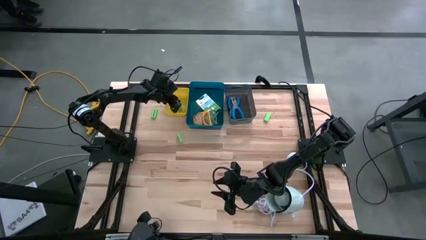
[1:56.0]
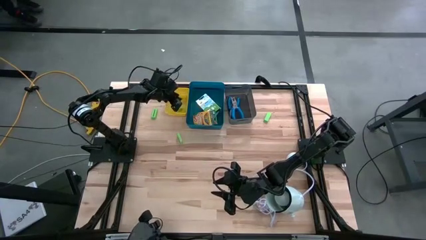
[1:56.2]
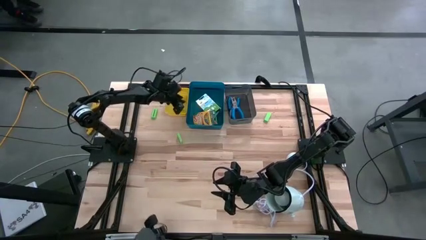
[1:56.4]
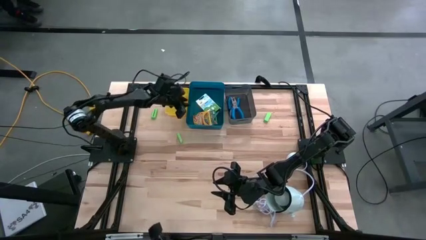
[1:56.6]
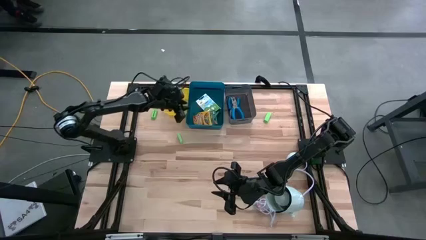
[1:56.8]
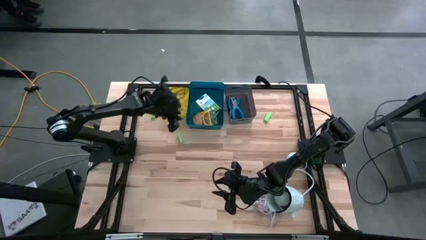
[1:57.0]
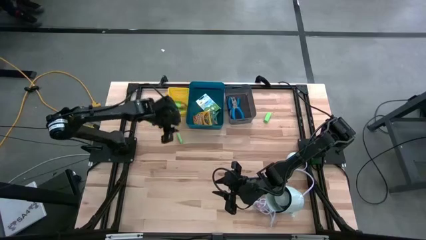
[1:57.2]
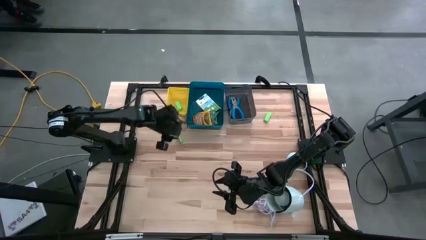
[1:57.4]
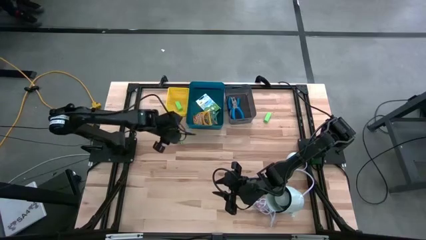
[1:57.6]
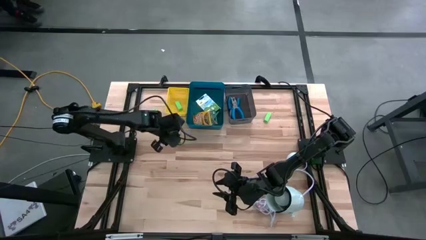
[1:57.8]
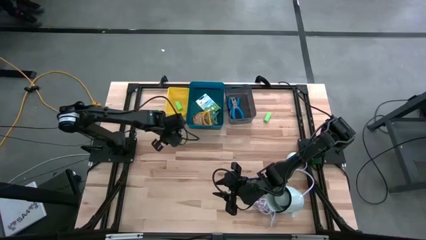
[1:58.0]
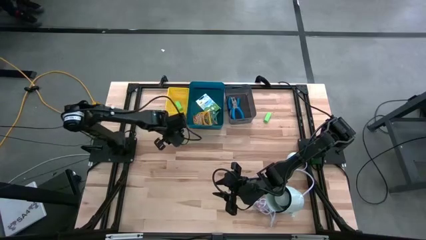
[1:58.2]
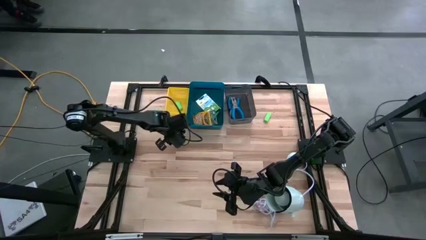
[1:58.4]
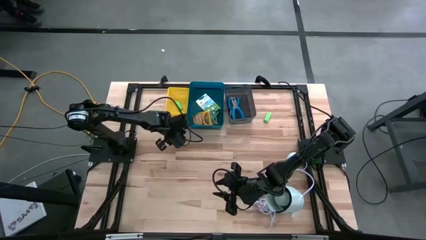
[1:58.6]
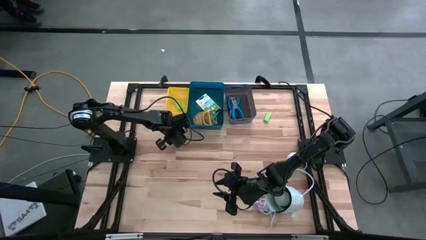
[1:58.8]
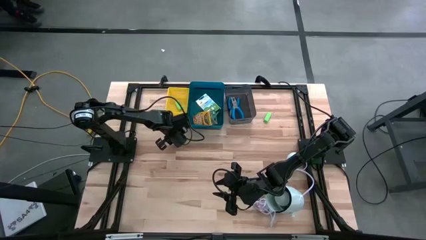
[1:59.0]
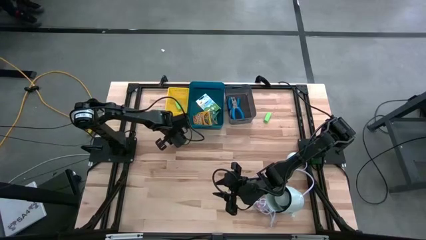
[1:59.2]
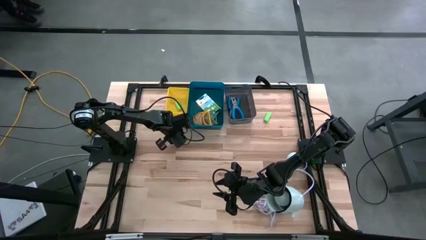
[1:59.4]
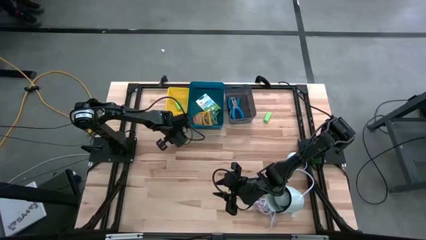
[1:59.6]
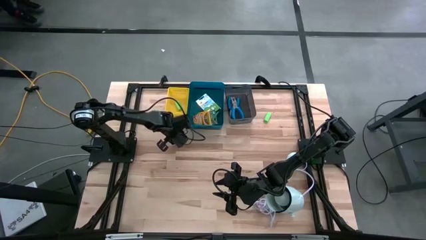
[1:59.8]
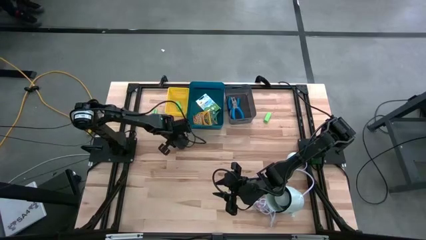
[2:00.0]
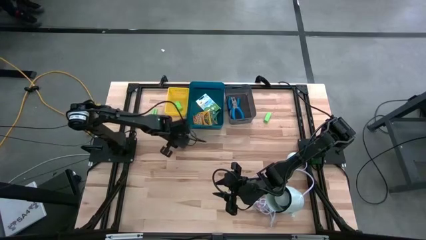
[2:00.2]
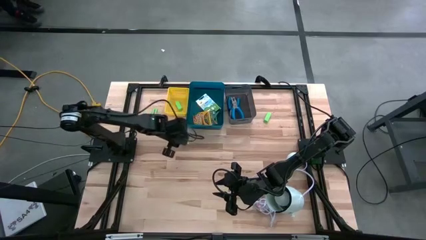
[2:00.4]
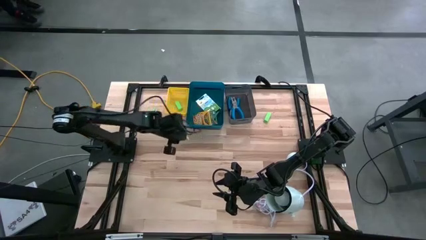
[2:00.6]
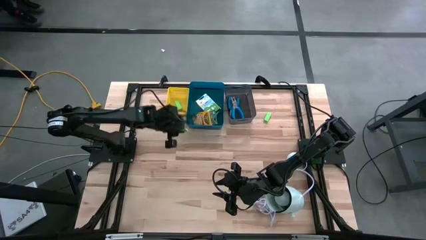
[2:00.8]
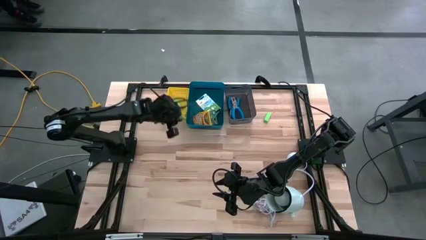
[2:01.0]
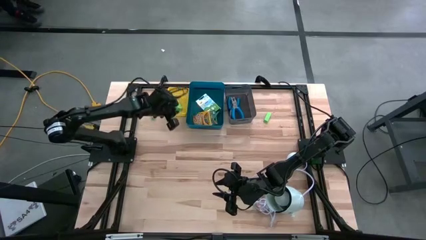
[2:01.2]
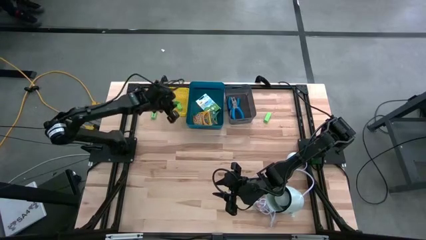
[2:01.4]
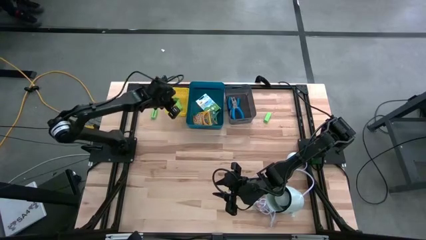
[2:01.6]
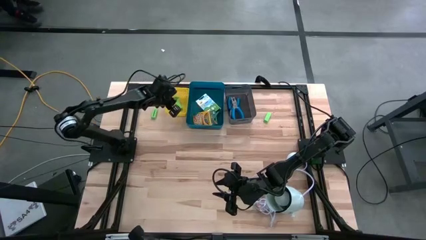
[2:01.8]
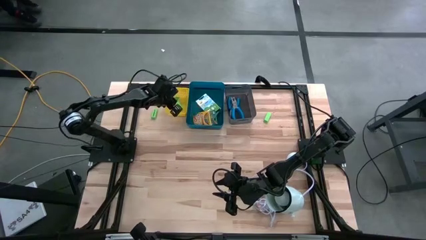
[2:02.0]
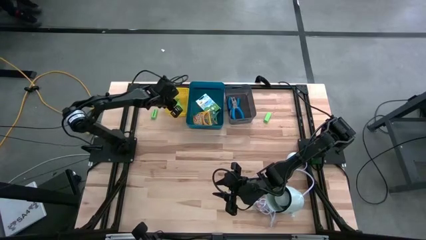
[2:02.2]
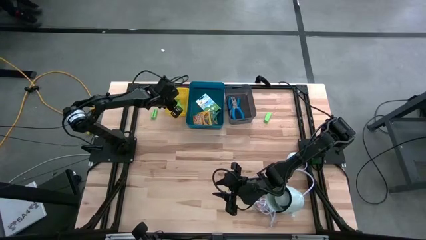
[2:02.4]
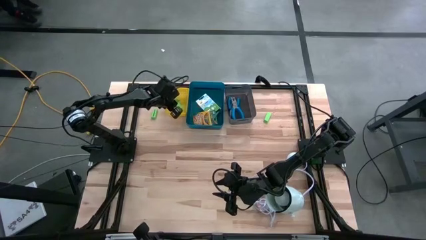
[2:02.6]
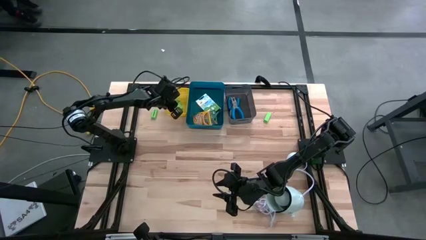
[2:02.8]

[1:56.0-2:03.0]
Task: Pick & Place School Supplies
Put the green eraser into the yellow bin

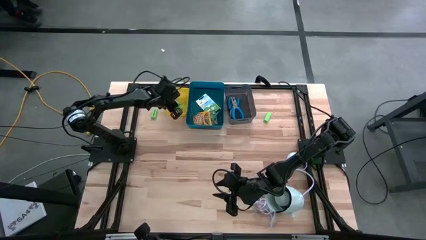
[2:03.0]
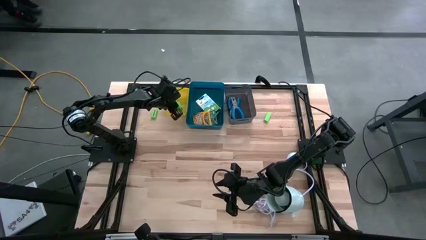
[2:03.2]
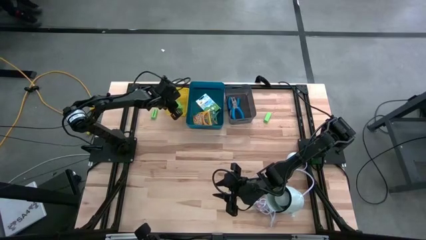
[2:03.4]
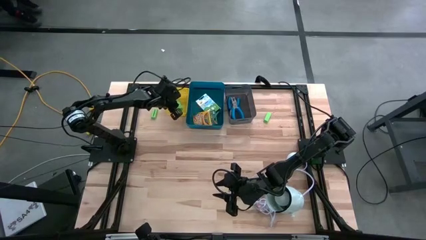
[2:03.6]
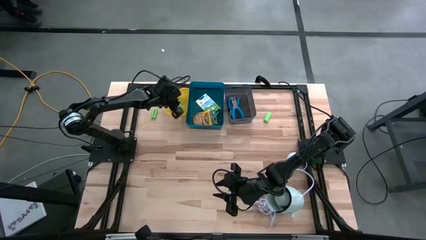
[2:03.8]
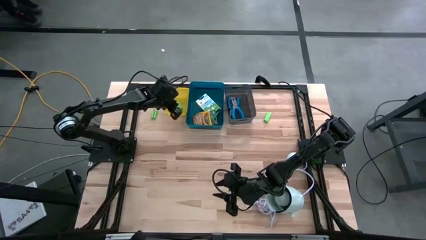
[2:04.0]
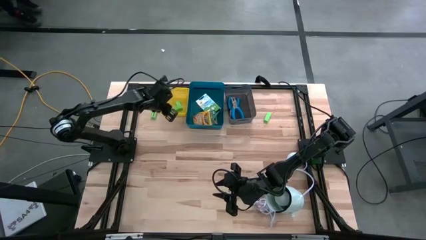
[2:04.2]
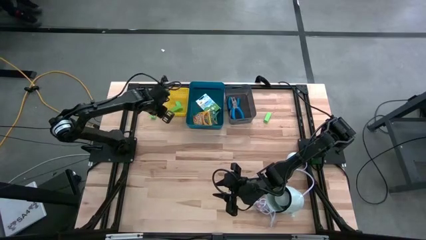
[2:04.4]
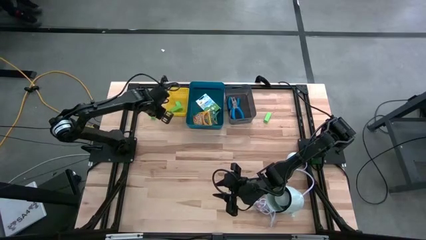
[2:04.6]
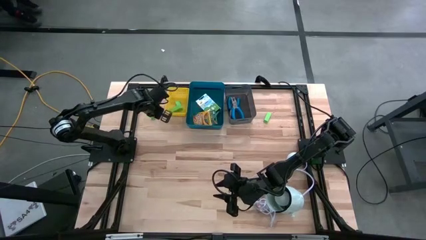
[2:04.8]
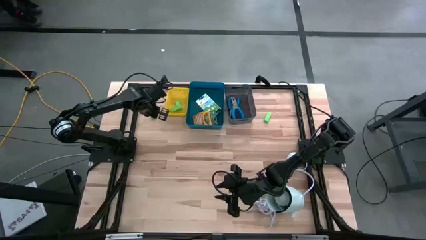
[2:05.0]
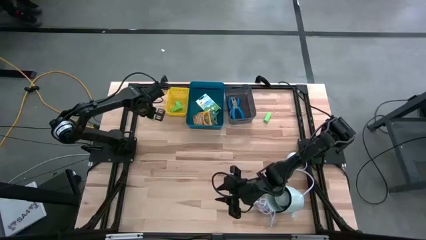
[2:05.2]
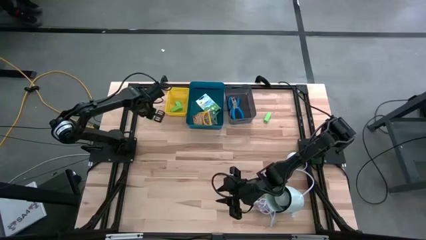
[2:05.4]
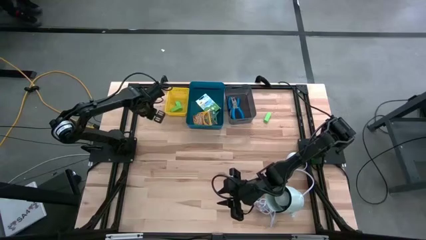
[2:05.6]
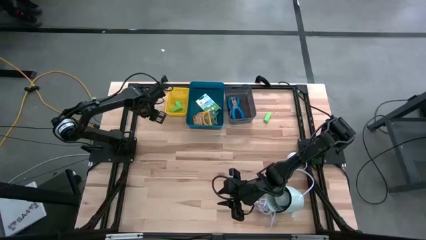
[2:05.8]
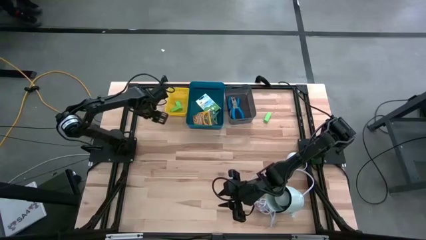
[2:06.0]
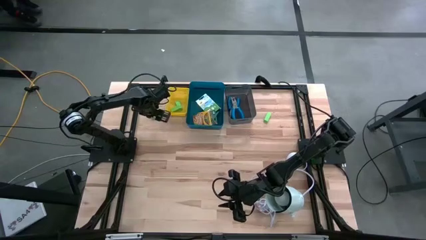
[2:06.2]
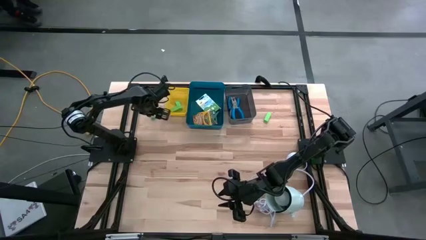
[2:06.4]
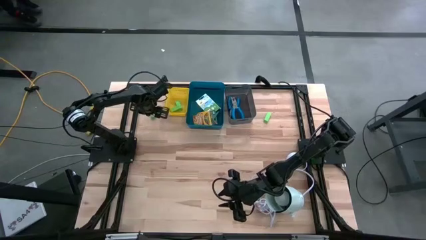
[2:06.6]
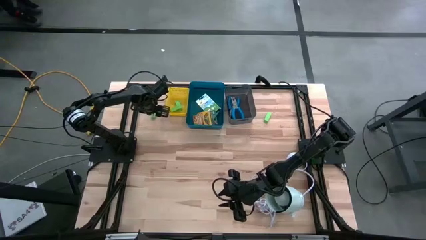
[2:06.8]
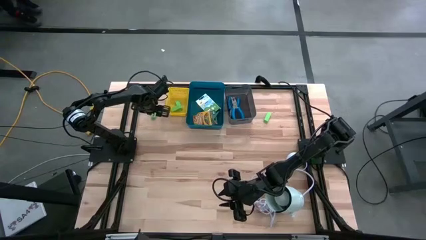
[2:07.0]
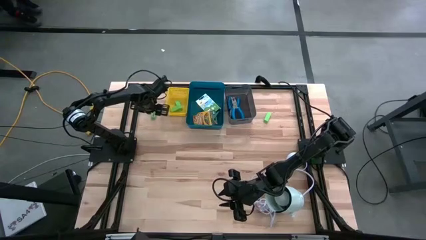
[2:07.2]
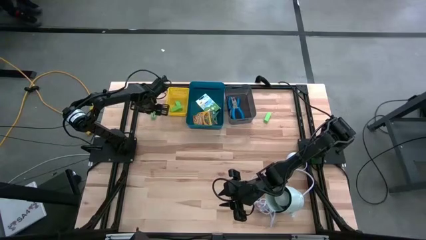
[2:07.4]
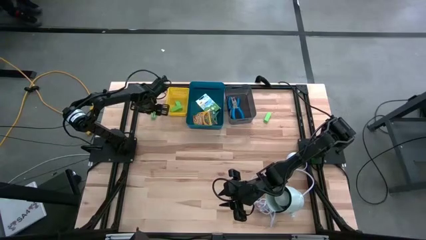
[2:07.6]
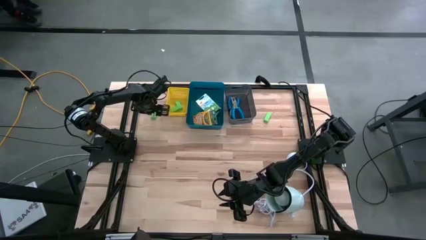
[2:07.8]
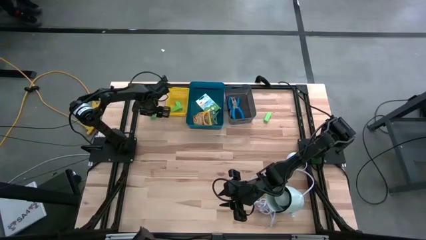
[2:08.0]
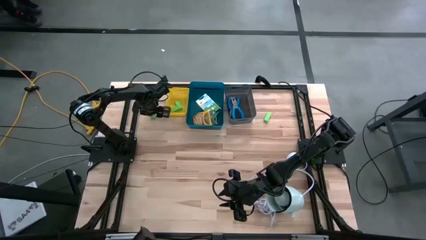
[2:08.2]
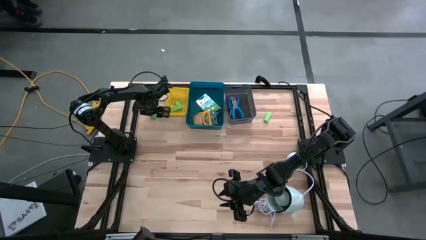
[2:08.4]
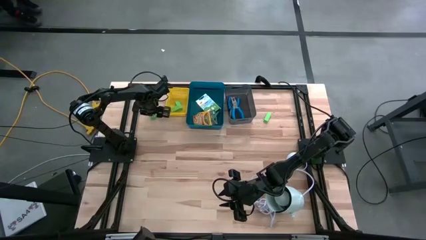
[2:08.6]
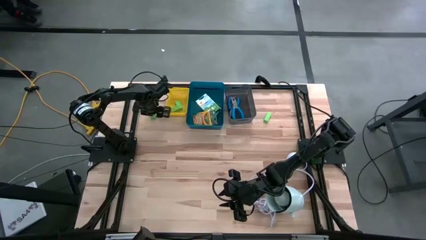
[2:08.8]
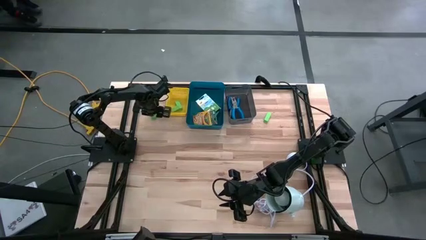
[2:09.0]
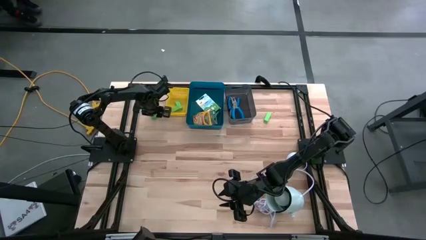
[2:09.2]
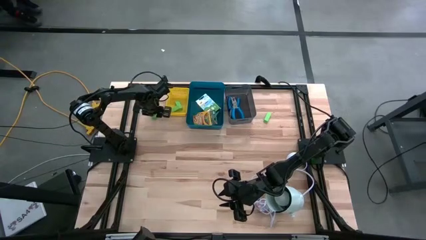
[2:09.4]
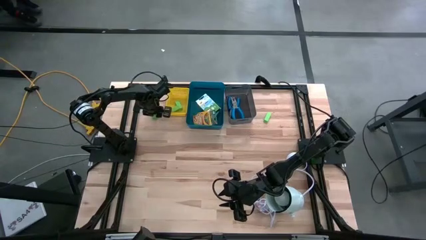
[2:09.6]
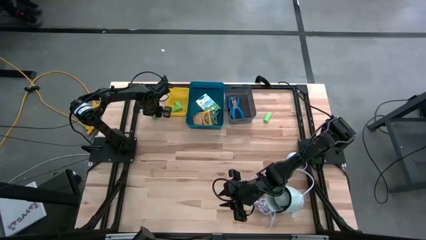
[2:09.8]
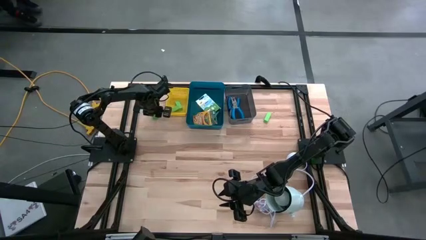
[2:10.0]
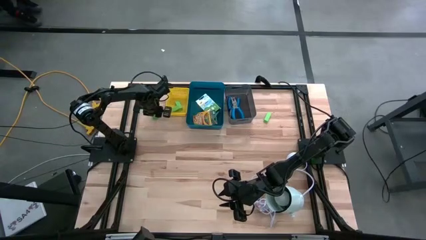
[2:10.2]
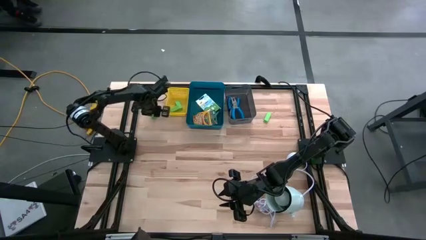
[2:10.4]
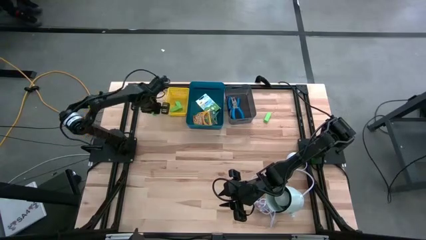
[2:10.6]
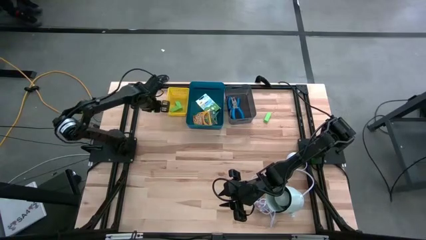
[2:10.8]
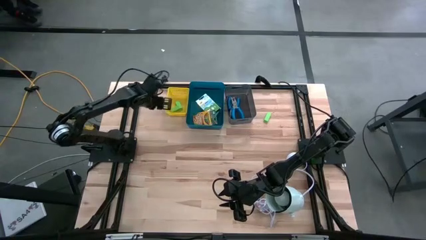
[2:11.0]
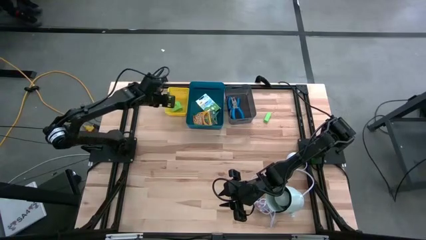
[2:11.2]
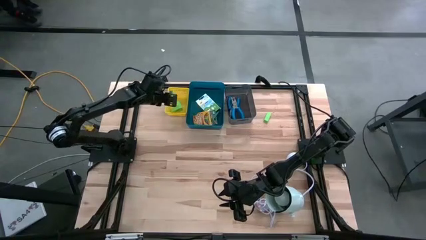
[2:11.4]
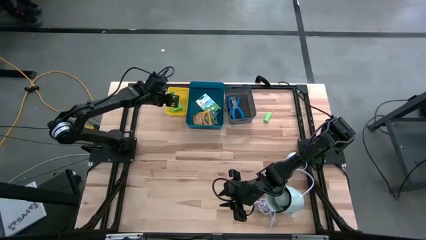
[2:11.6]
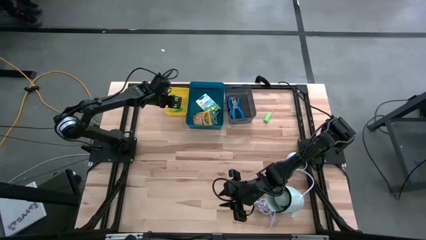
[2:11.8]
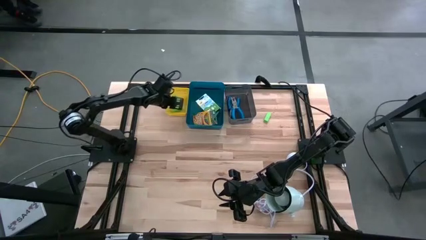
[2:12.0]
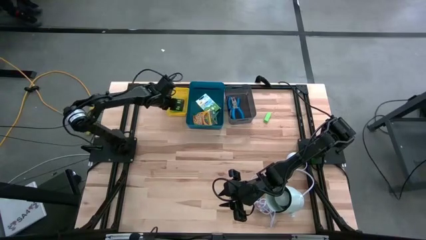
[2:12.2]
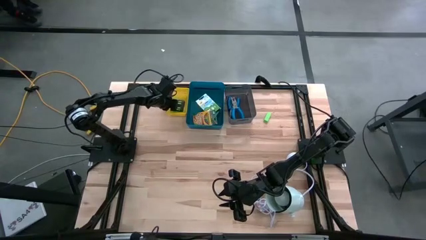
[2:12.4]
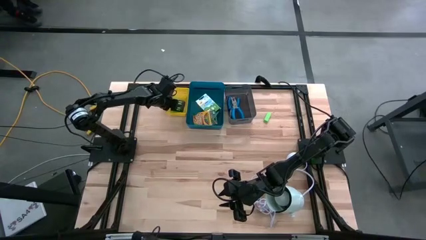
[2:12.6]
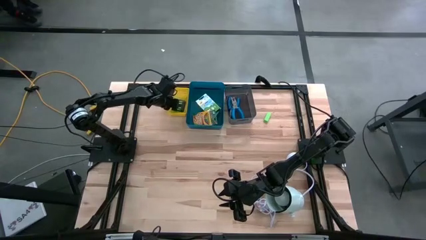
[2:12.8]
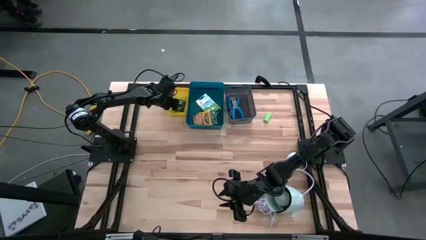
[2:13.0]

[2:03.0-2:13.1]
Put the green eraser into the yellow bin
